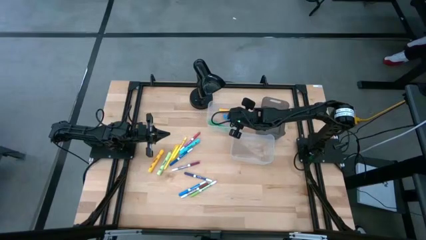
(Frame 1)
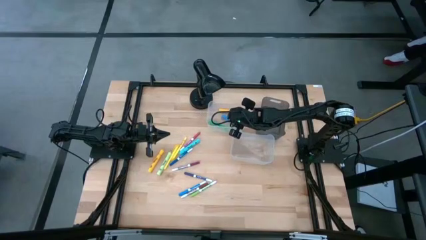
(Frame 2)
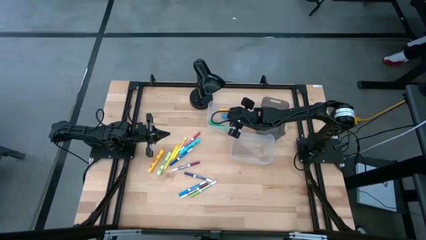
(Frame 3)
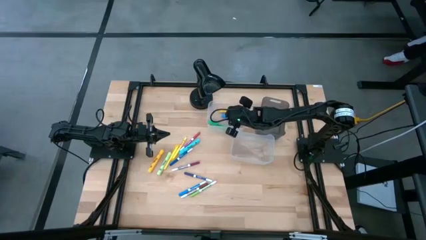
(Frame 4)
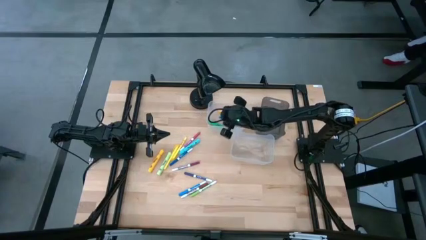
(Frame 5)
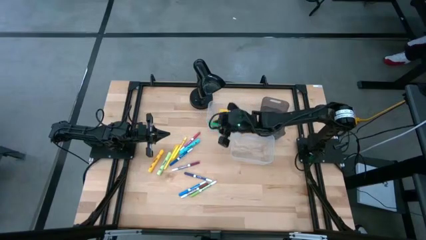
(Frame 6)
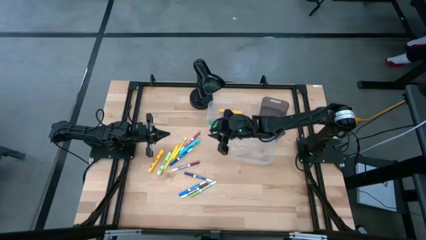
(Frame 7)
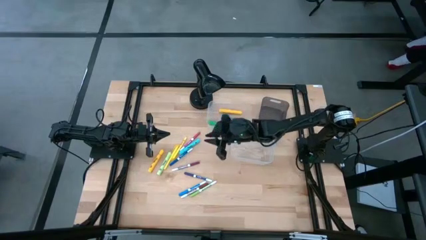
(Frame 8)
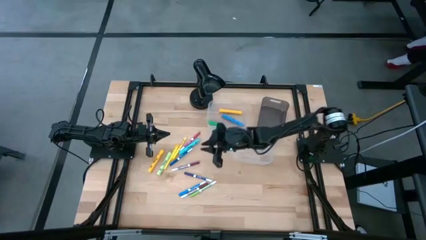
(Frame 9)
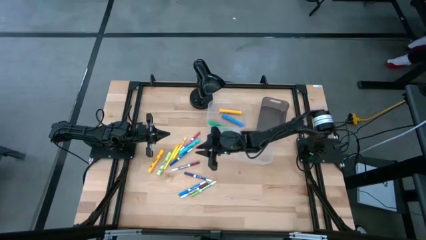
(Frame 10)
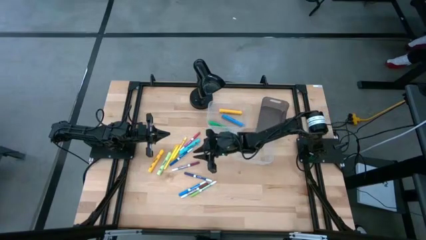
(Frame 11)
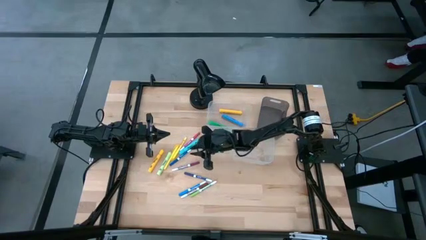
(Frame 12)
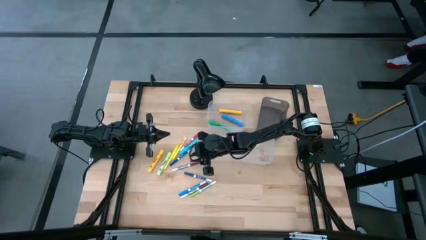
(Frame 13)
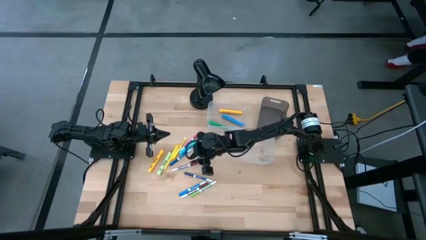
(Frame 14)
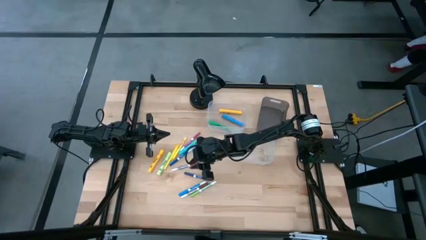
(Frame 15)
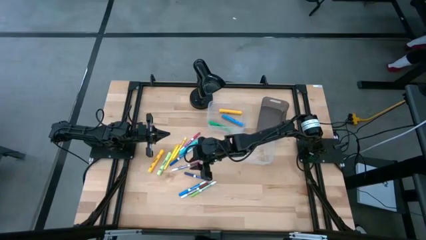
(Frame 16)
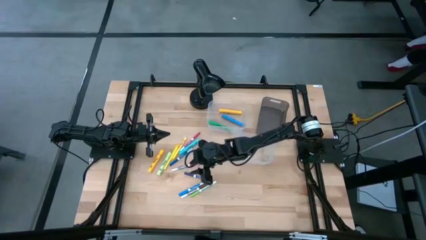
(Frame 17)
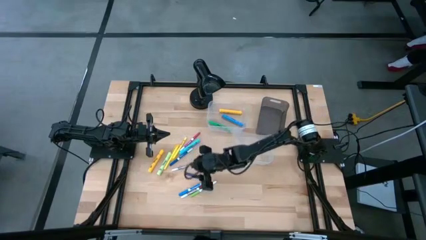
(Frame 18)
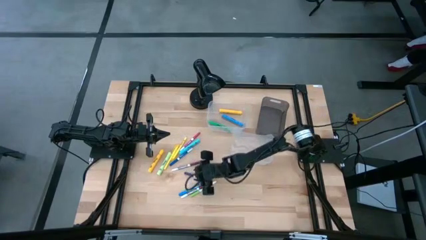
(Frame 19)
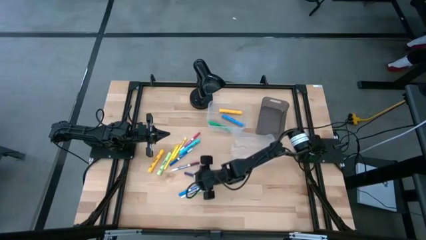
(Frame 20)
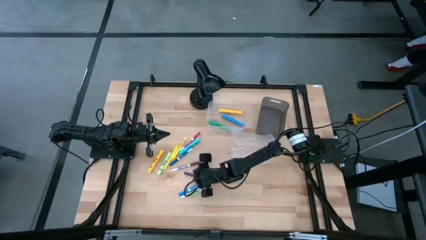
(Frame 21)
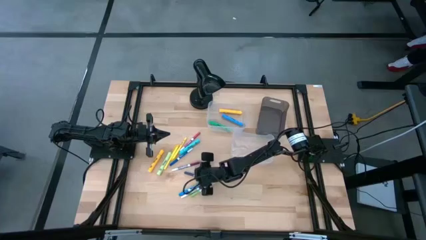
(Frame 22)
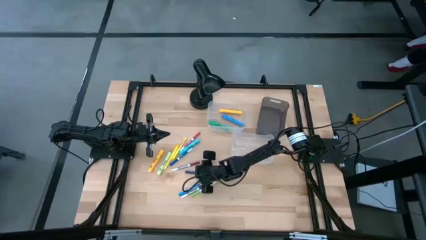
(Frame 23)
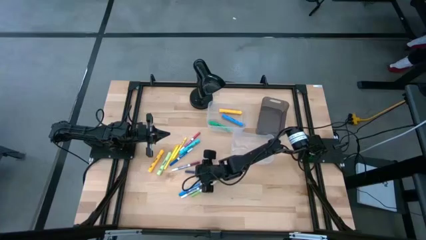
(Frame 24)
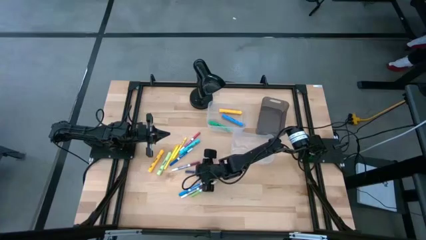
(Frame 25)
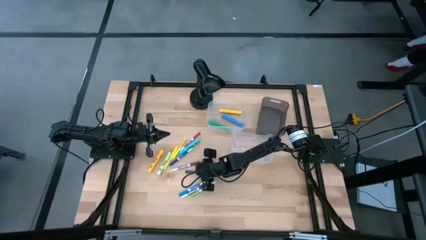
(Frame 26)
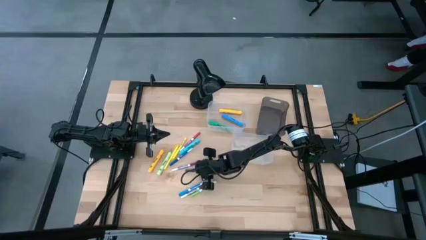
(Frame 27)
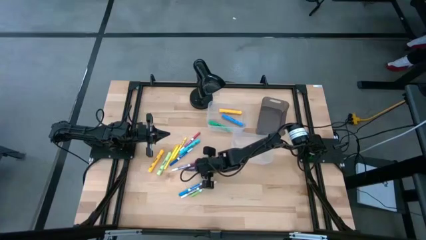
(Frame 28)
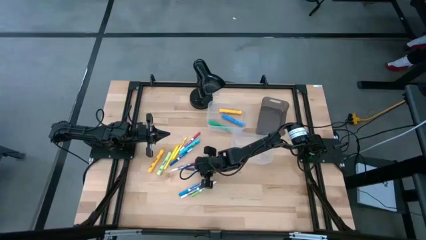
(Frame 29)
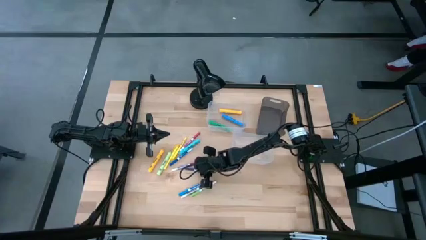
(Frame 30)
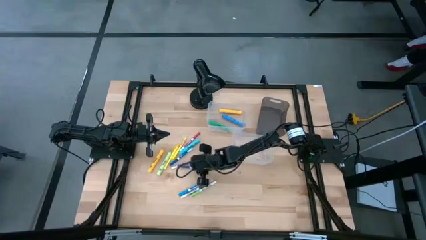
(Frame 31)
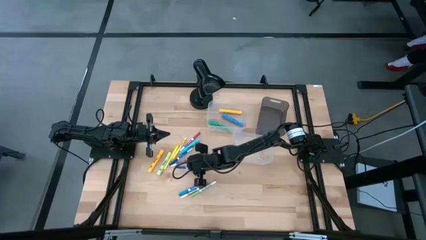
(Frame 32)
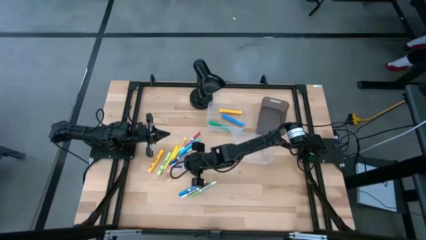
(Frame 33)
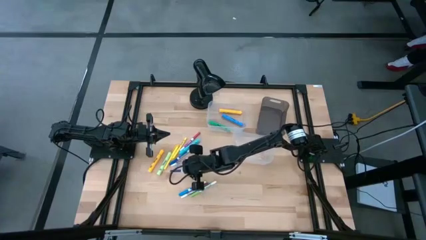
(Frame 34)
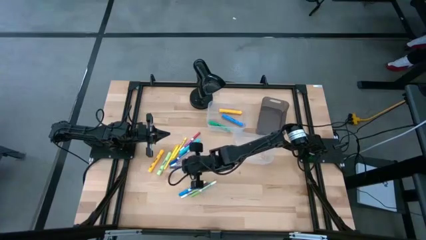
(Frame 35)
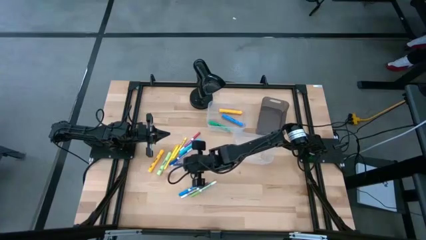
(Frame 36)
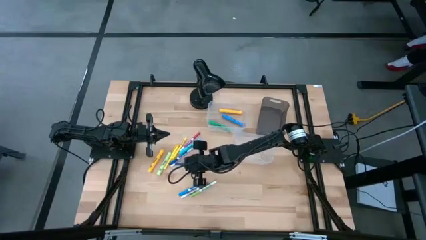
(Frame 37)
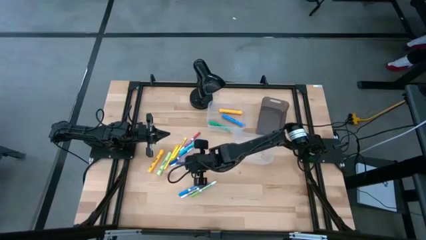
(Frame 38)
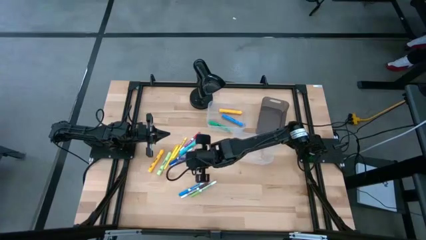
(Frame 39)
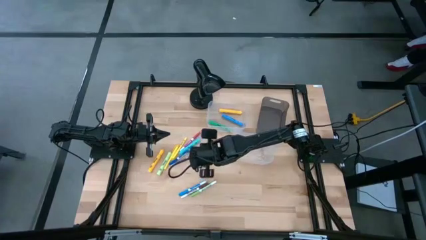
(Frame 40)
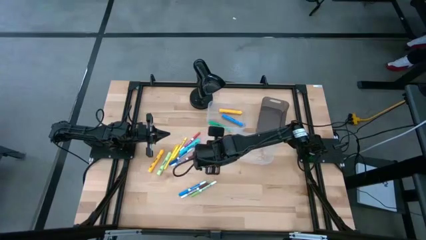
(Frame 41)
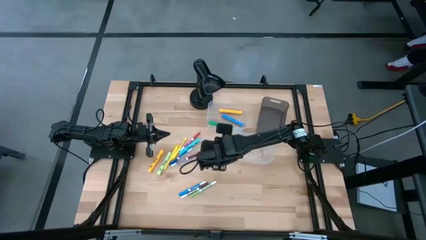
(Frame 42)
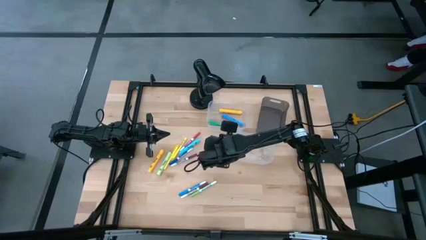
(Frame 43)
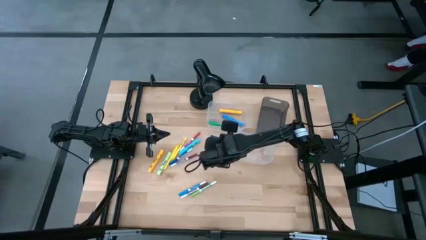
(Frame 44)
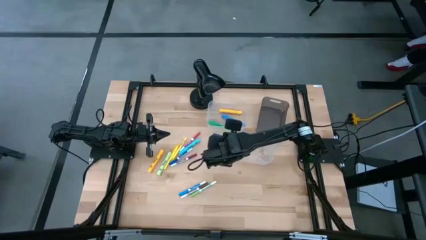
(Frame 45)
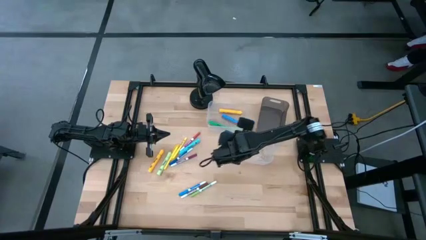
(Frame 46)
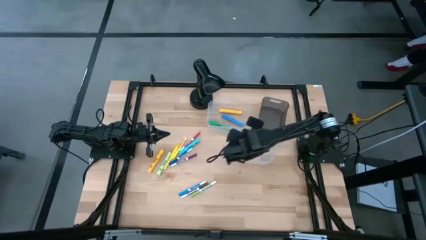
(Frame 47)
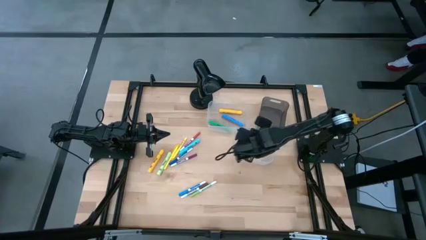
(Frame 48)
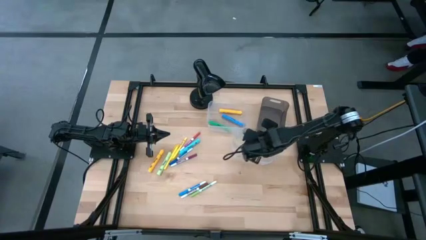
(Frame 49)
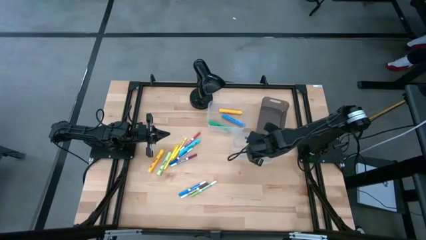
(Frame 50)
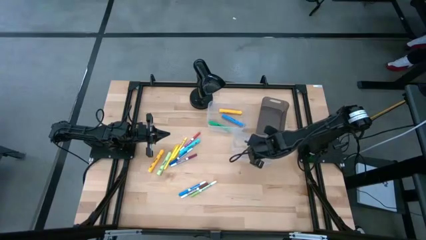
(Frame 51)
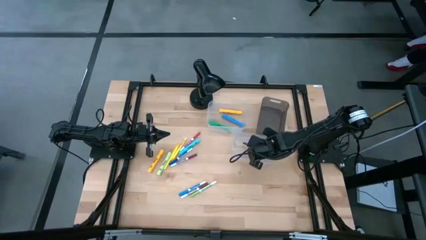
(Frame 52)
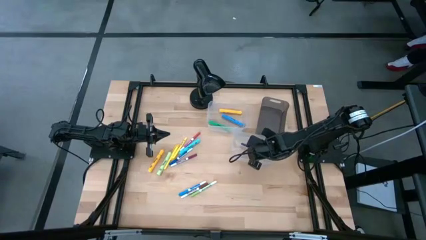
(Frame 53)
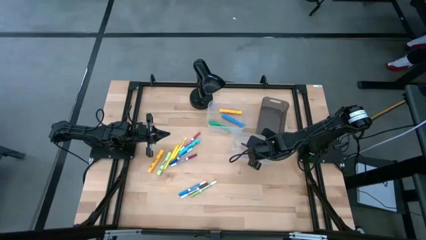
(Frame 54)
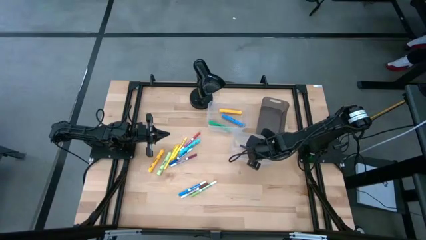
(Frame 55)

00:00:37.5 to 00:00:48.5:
Task: Pick & Place Markers
Put the dark blue marker pen into the bottom transparent bin

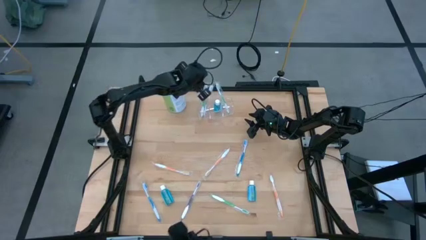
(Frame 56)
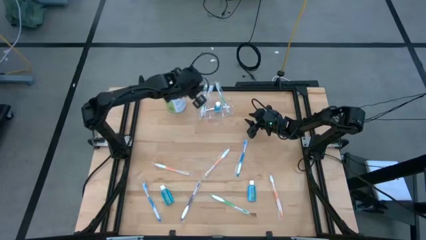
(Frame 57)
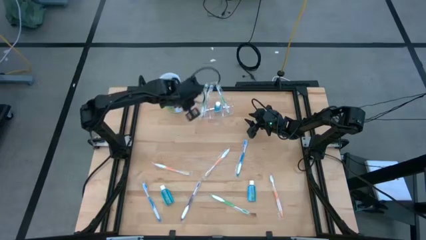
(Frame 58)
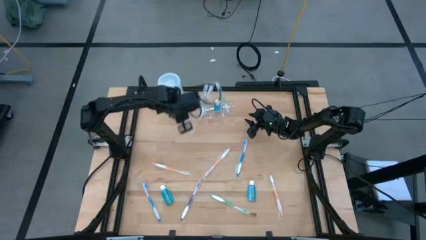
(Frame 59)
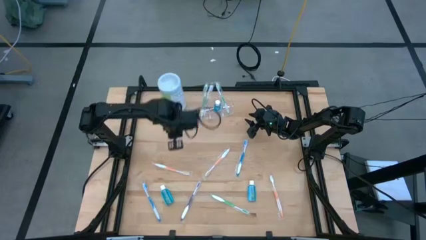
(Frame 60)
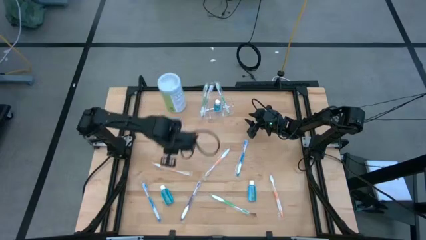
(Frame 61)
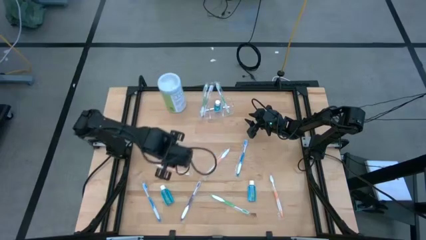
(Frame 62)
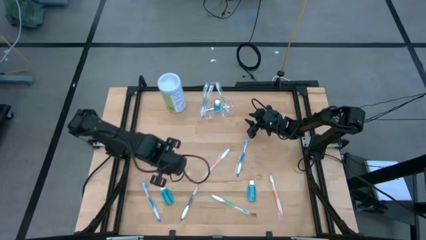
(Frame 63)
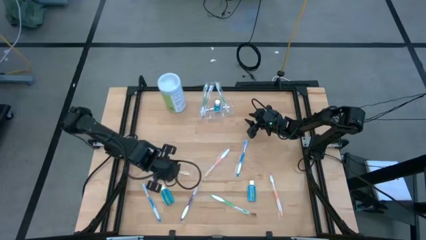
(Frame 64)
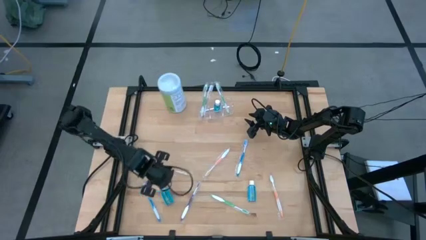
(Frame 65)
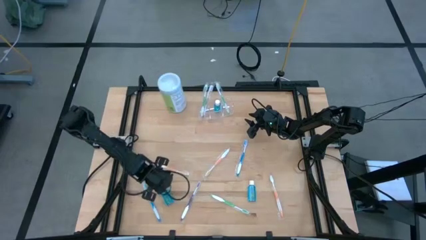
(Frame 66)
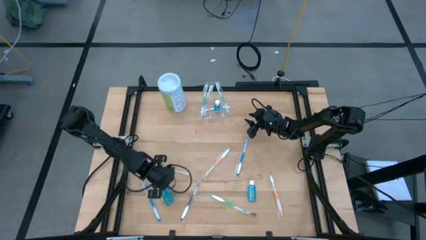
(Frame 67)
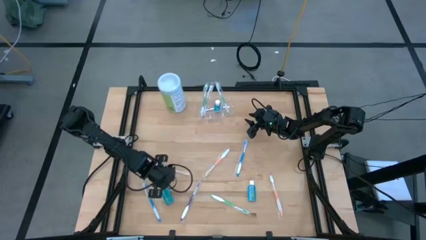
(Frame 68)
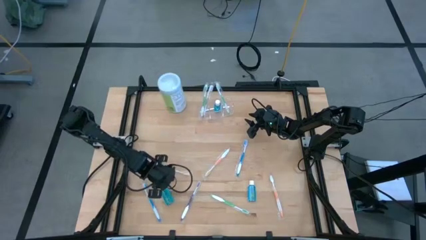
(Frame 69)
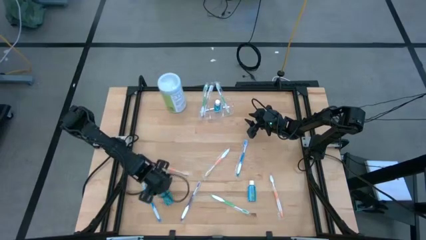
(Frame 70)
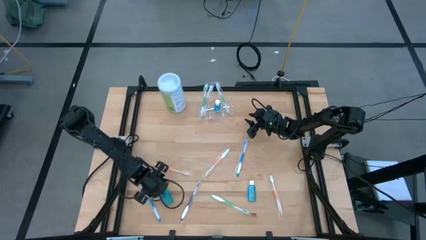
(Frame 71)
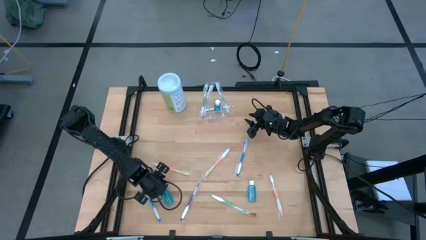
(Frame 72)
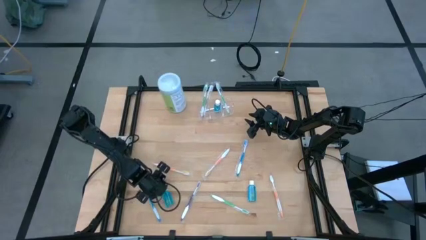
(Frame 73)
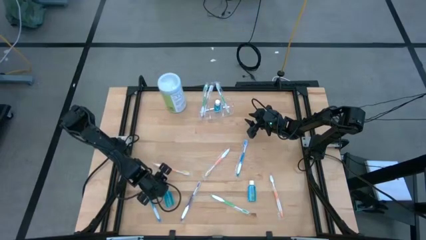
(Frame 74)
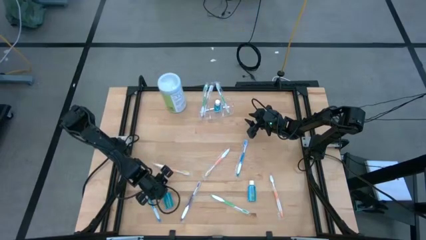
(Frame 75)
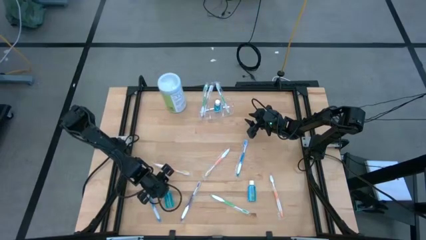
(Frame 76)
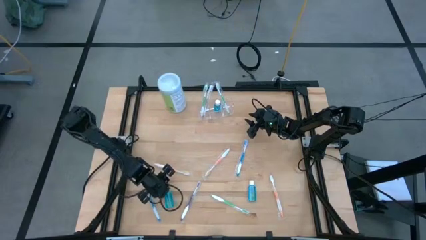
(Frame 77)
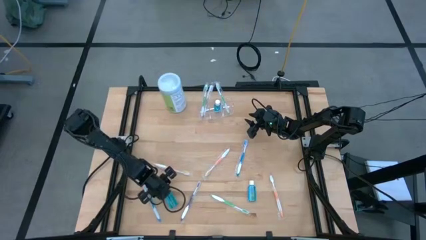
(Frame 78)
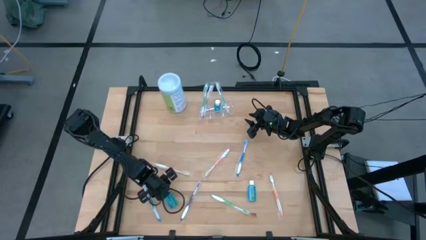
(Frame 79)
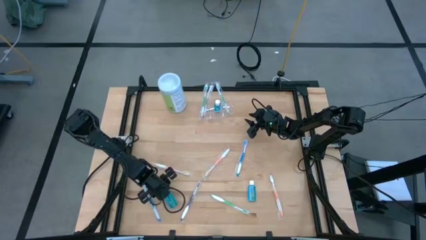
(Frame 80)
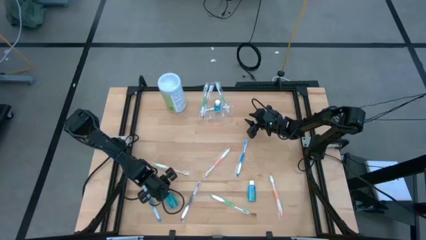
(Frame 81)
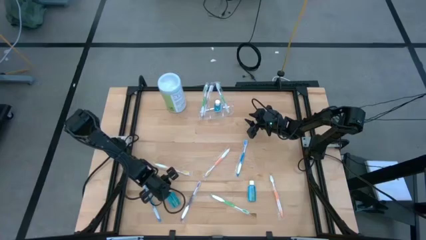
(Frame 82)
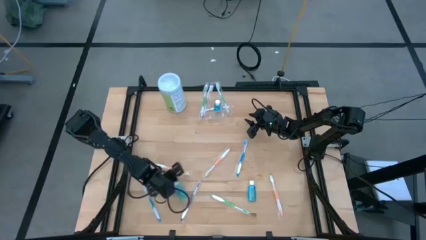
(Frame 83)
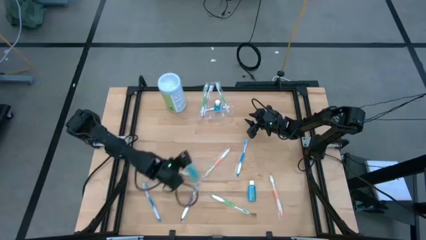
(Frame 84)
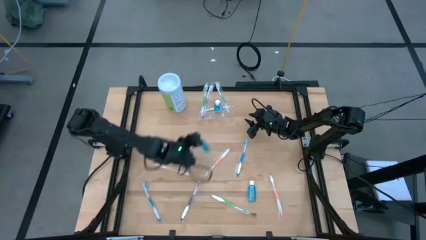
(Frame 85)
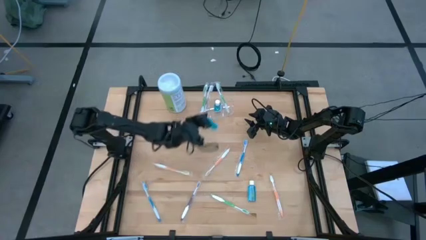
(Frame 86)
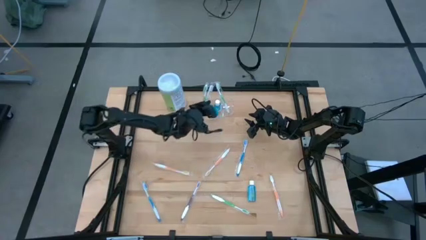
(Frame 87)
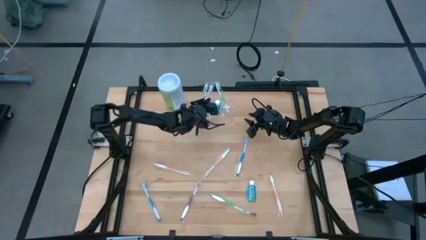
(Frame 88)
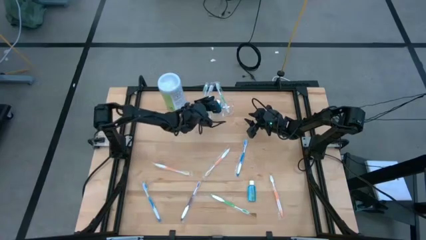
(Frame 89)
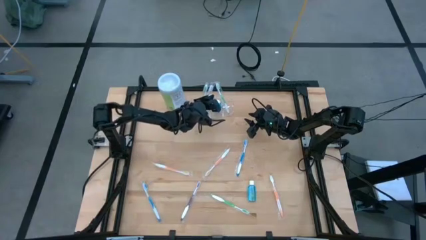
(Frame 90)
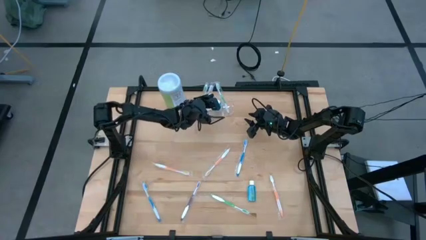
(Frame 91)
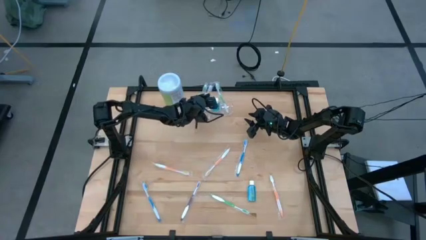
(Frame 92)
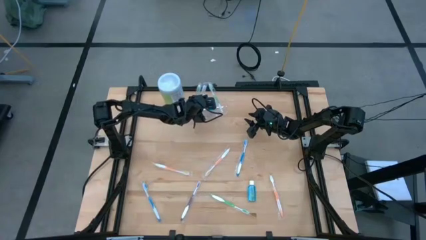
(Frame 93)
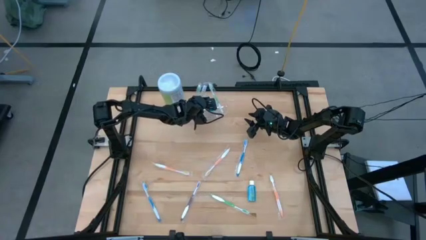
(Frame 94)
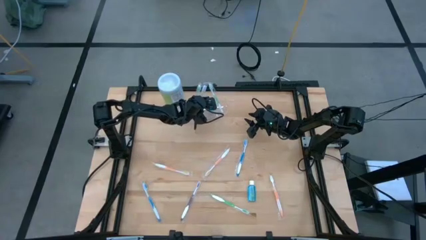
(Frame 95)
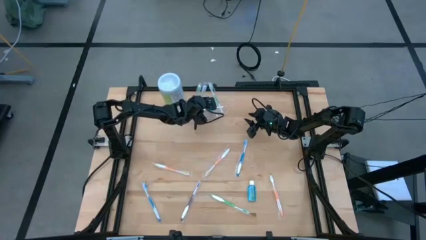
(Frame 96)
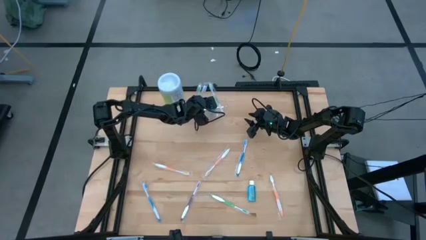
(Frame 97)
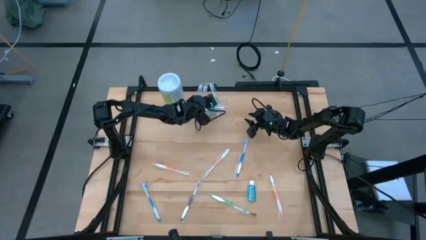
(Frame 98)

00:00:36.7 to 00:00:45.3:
Task: Pick & Place toothbrushing station
Put the left blue mouthwash into the transparent organizer
